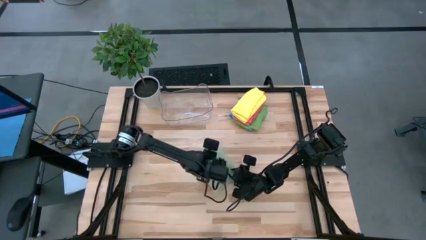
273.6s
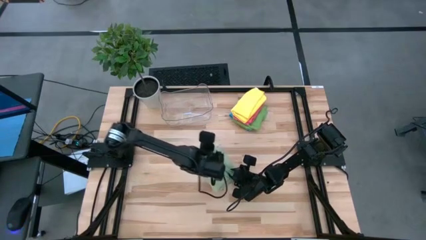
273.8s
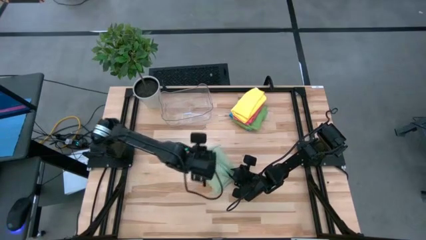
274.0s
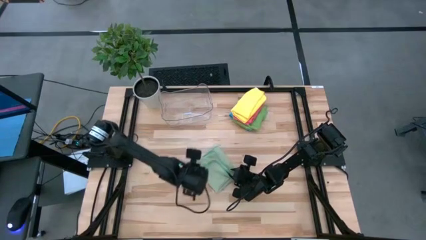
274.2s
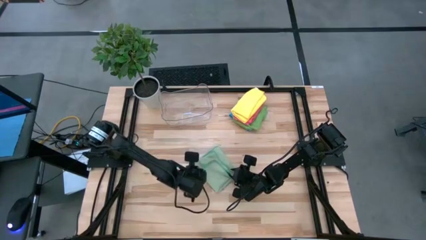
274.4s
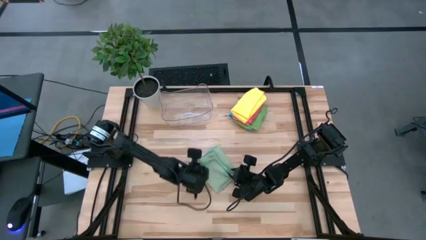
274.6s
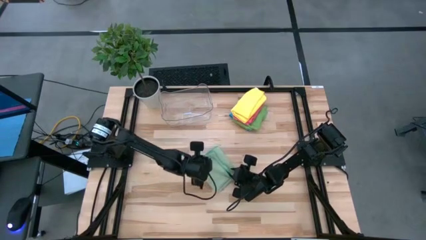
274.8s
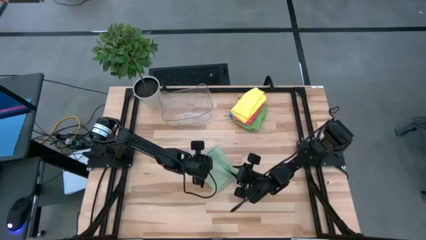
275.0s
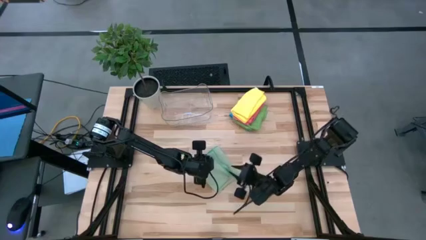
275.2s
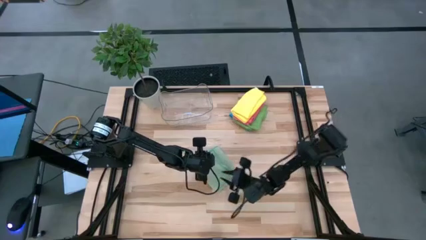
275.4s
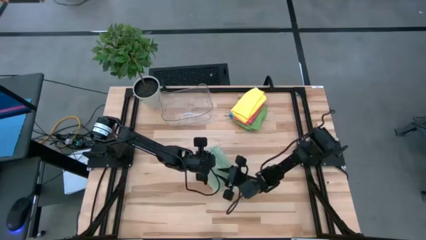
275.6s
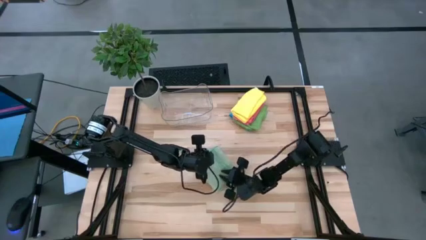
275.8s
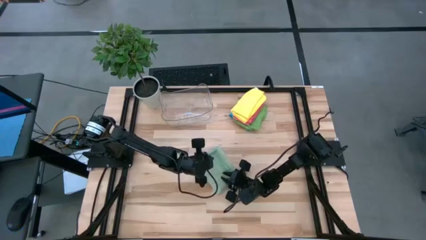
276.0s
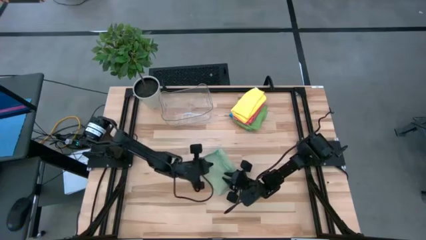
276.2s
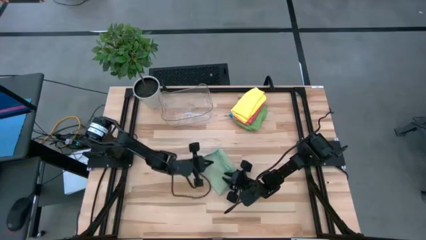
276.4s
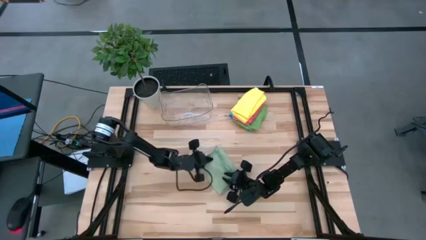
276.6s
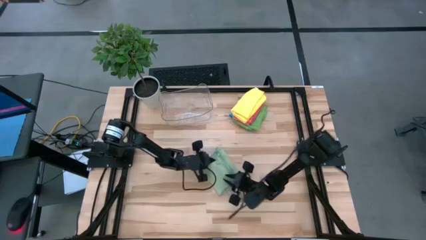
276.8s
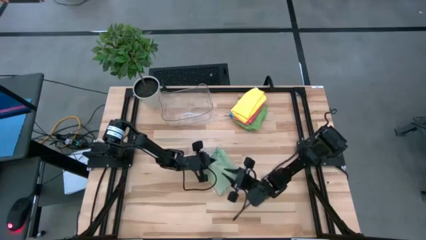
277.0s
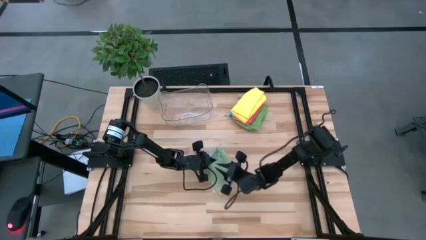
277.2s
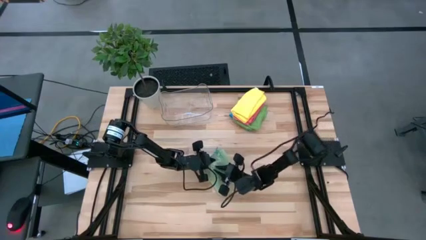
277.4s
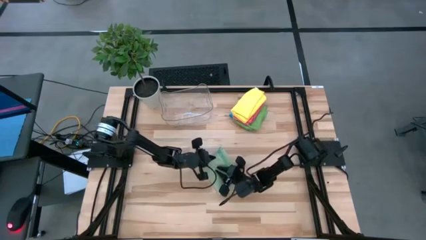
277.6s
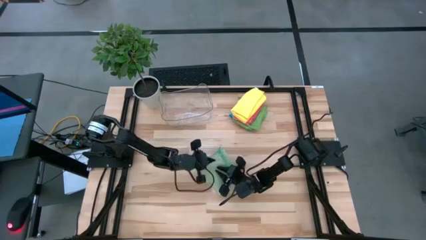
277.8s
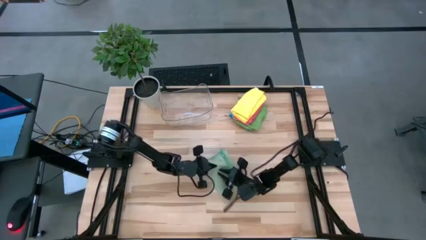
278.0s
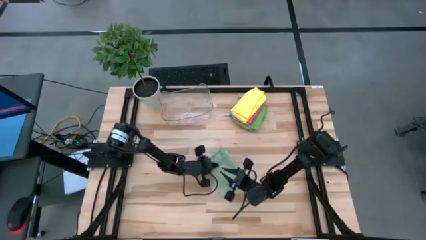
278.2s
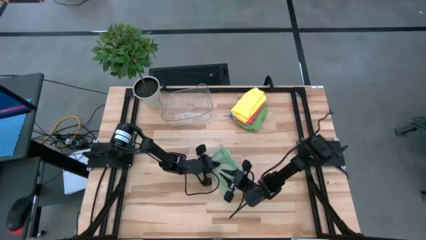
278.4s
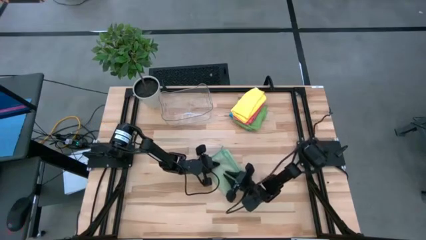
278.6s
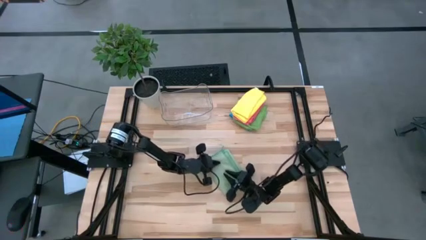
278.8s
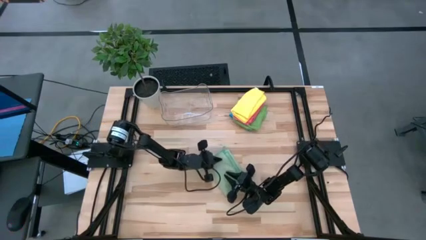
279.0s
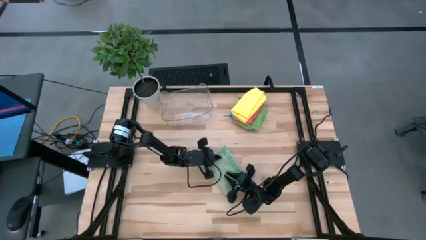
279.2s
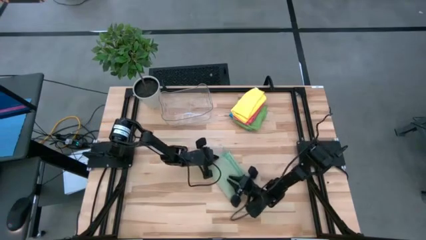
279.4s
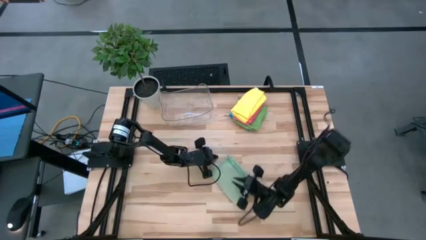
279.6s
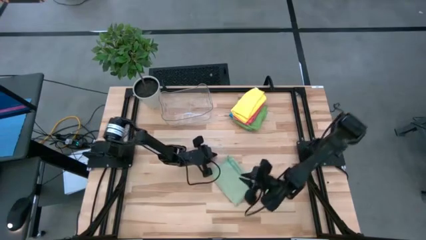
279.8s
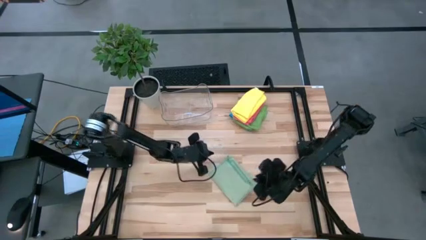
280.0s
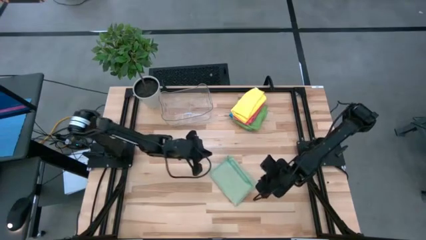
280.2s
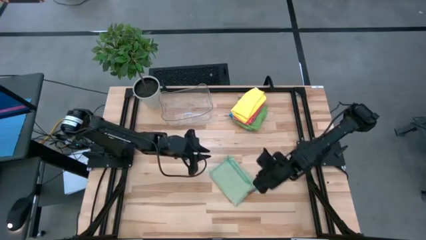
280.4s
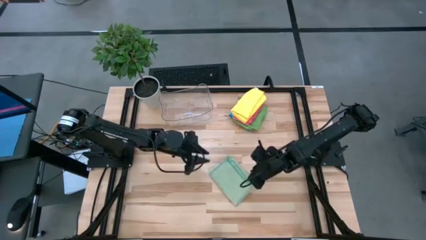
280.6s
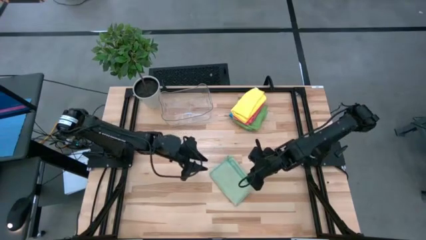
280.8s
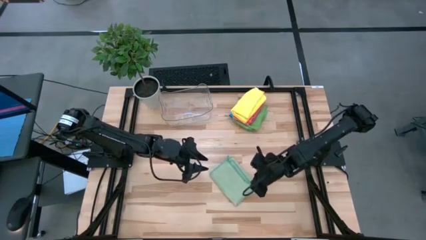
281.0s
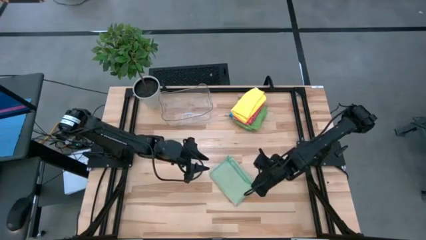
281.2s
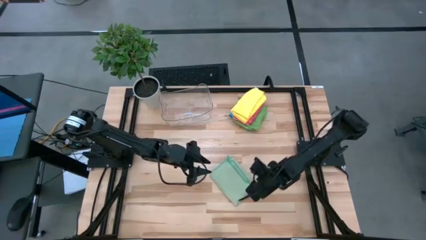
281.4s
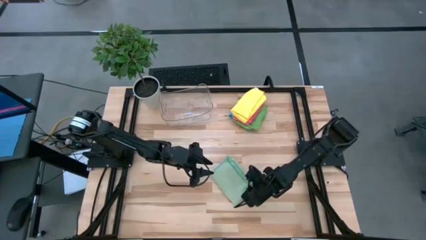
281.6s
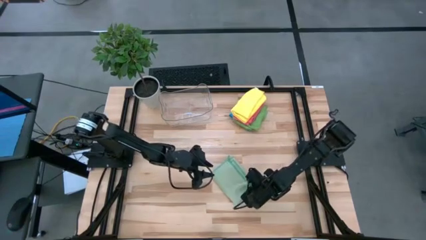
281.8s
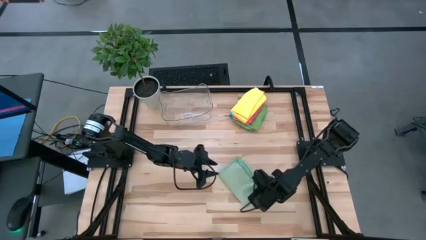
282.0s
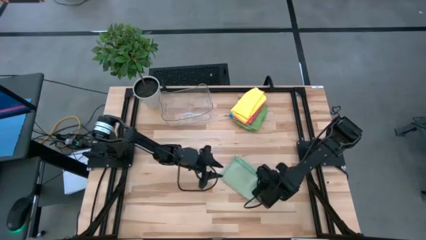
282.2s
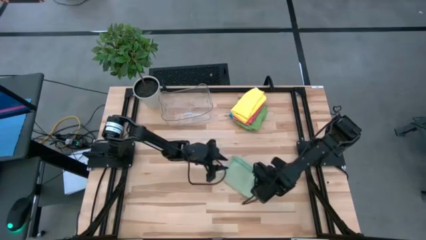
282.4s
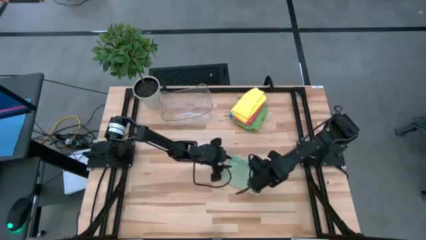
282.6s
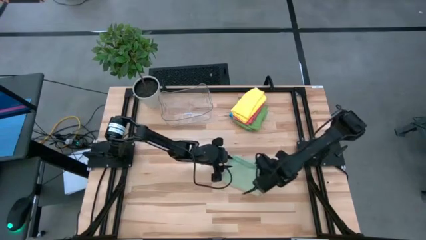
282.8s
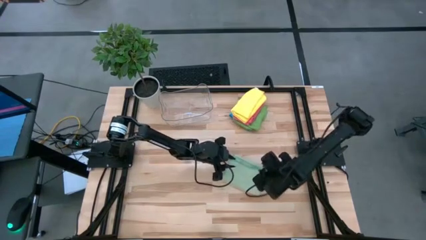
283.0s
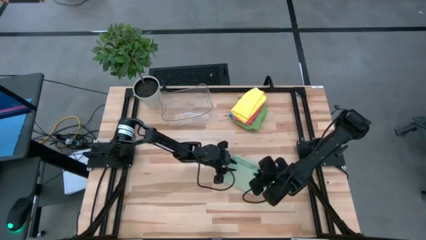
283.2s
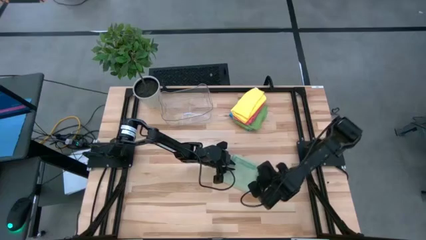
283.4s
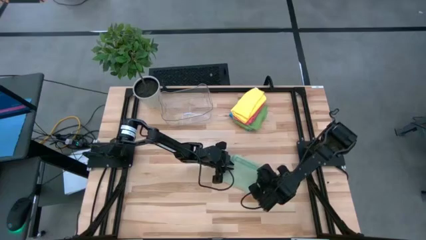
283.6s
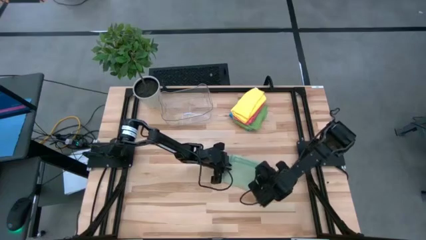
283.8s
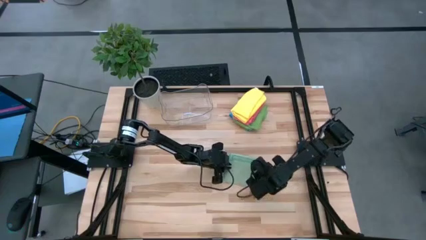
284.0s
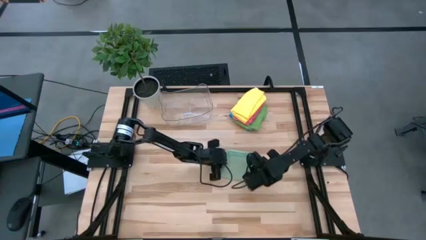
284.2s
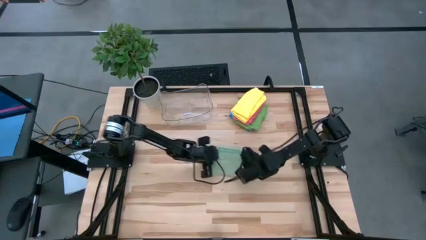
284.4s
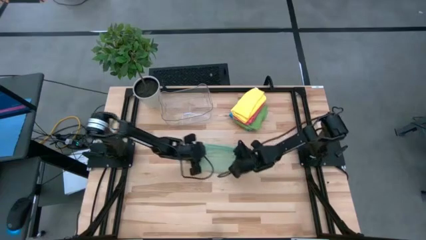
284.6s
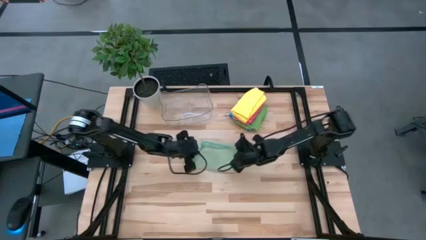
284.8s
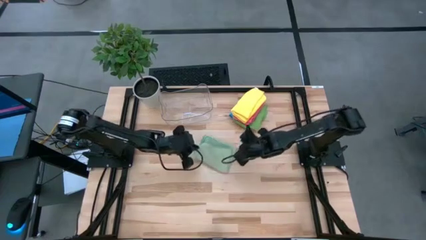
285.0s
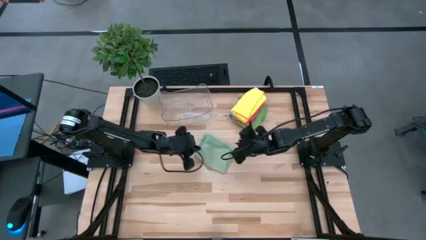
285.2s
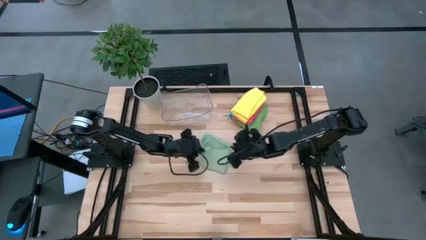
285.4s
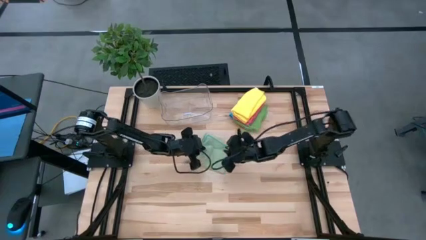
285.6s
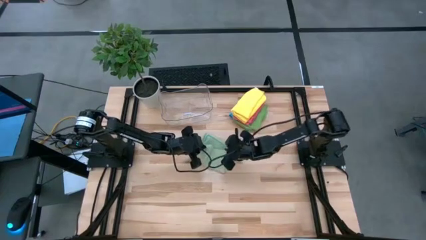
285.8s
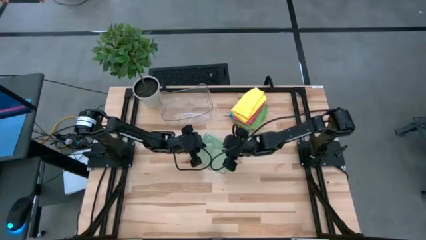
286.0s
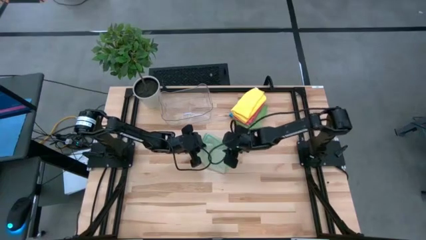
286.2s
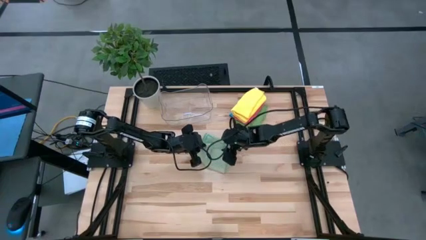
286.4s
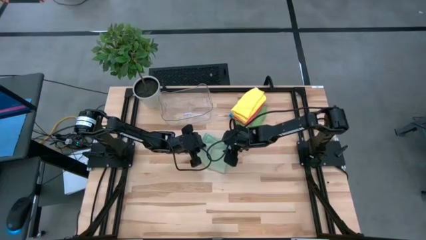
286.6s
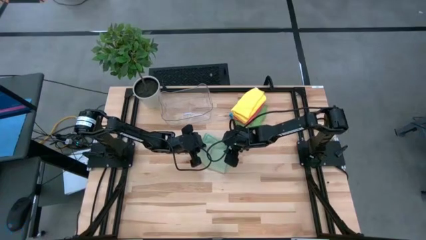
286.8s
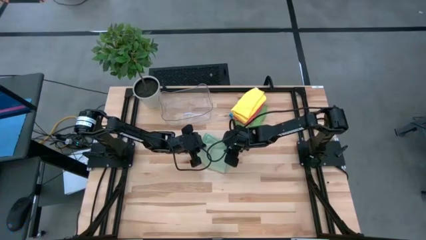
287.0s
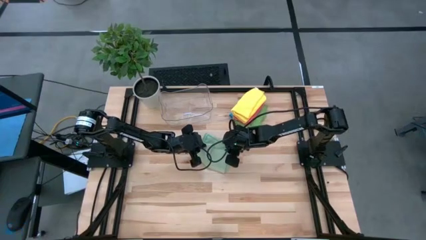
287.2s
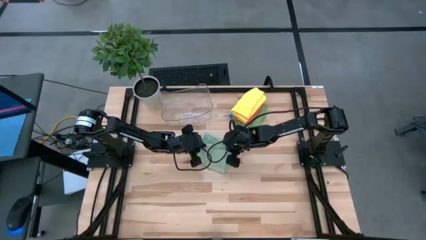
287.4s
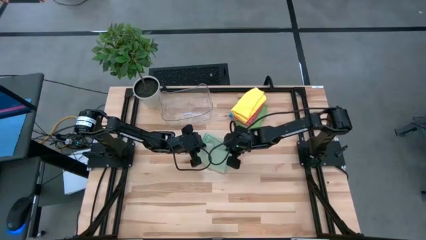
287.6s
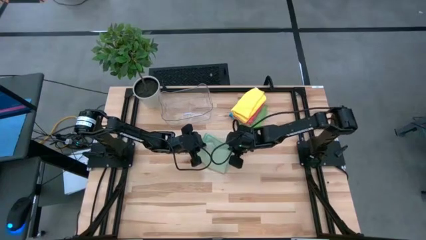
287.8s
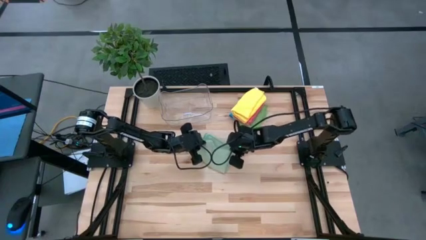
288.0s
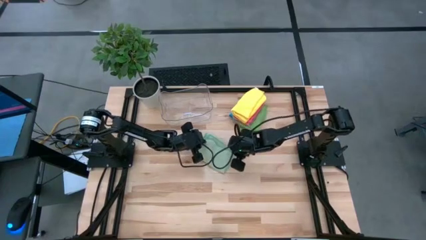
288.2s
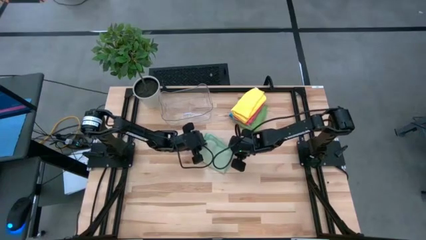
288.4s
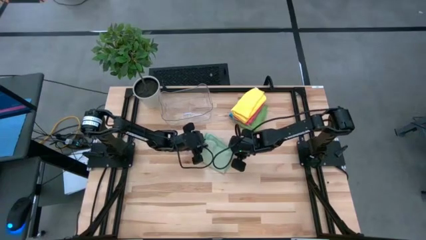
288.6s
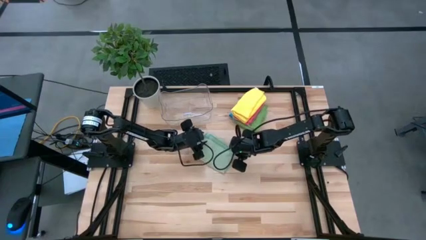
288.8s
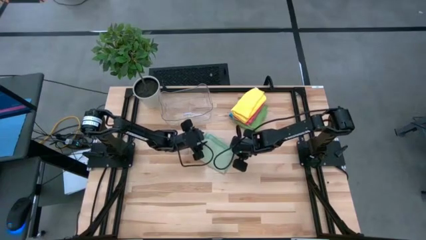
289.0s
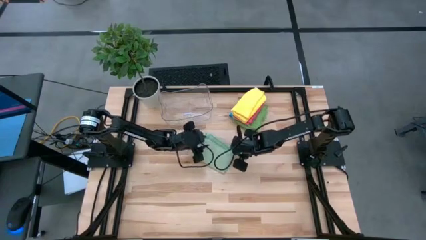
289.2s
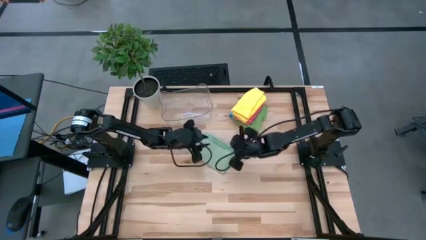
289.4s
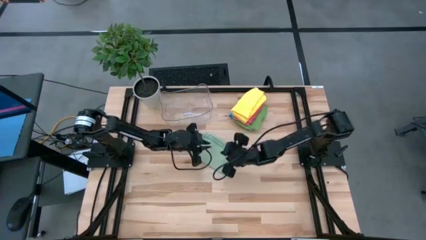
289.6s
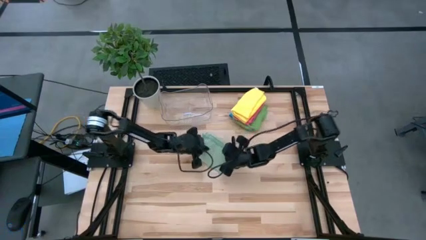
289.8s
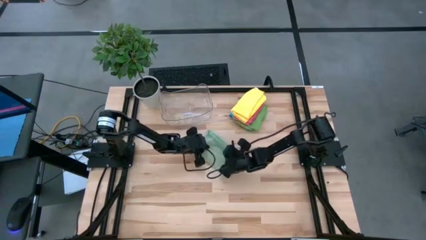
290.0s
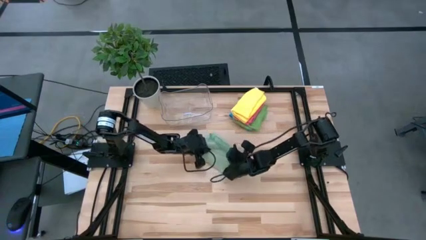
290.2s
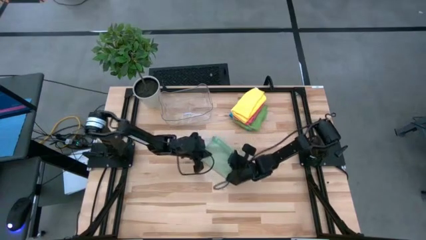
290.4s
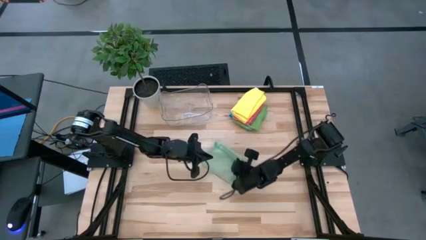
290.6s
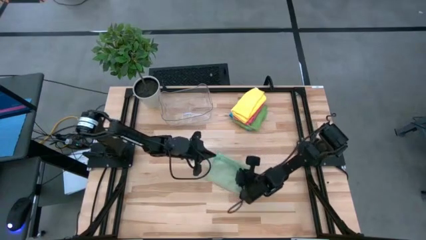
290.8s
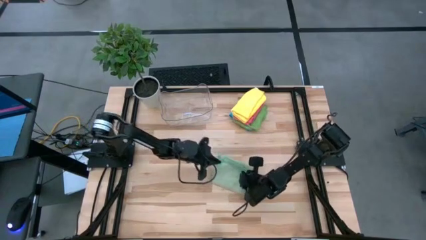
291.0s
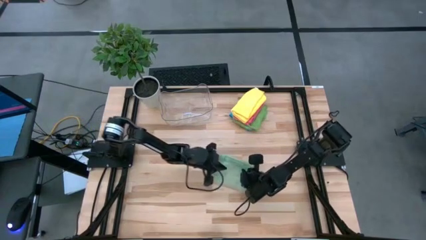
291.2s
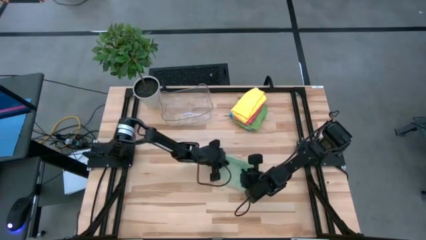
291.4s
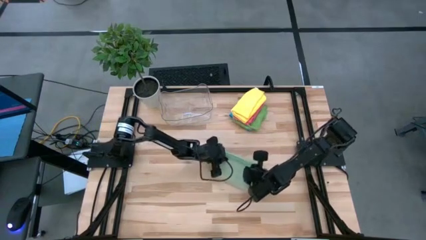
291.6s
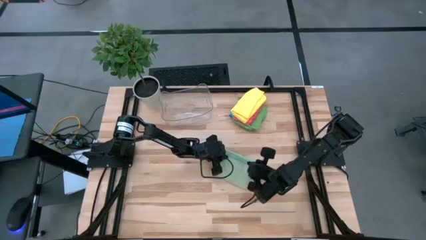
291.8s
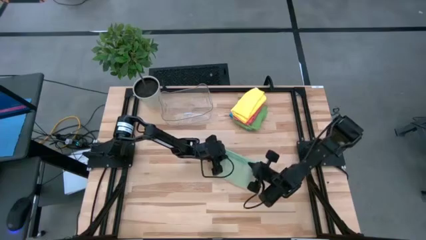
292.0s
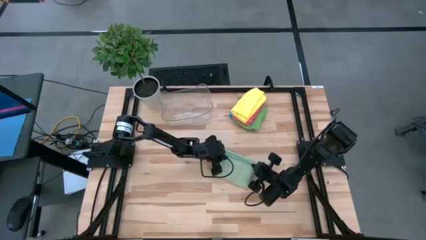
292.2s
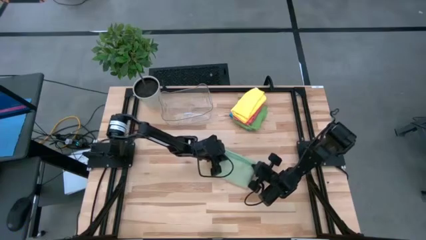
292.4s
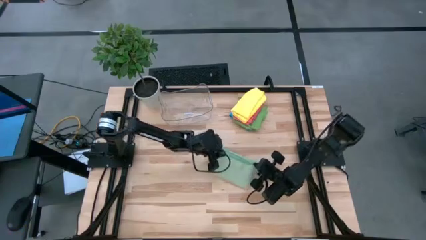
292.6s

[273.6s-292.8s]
Task: Fold microfiber towels
Fold the light green microfiber cloth
